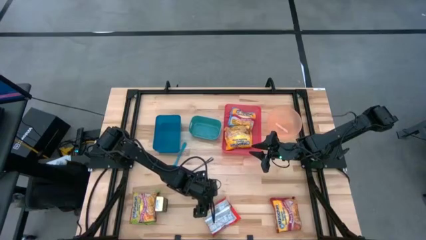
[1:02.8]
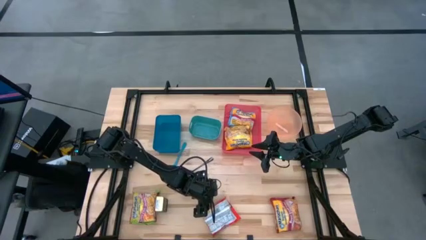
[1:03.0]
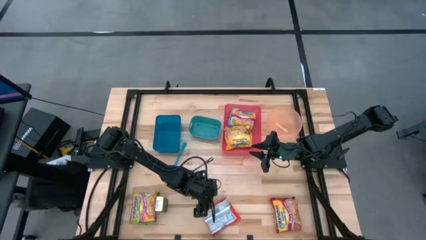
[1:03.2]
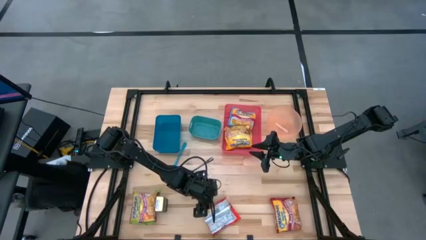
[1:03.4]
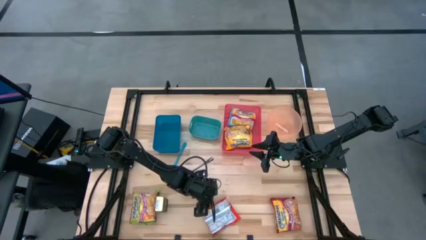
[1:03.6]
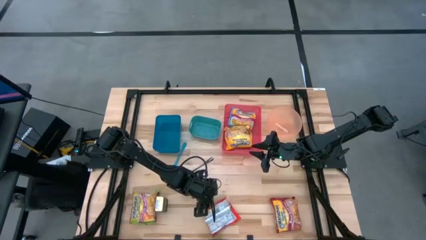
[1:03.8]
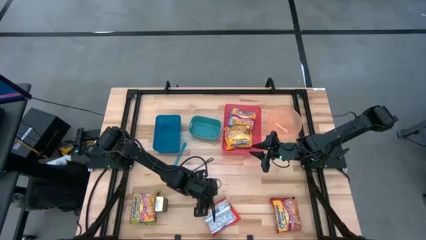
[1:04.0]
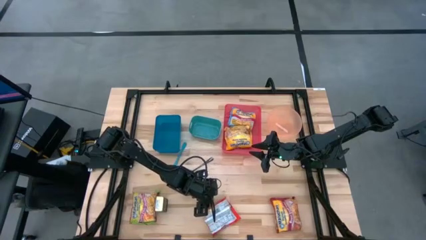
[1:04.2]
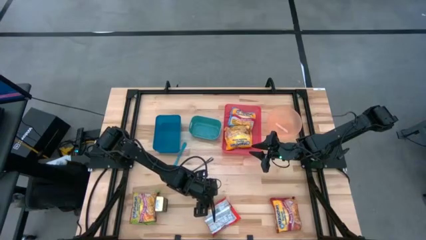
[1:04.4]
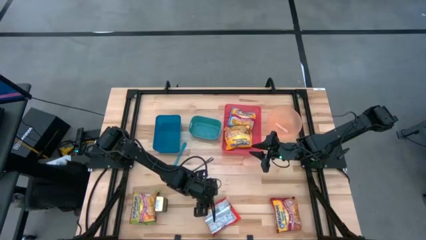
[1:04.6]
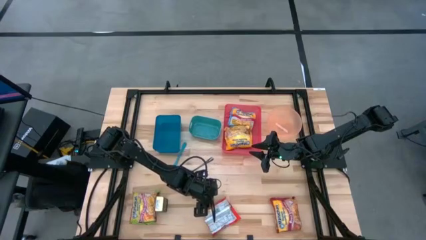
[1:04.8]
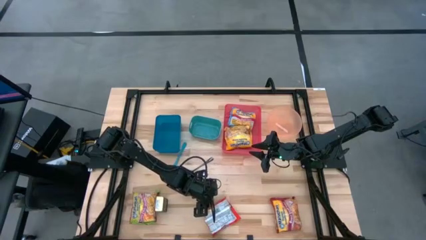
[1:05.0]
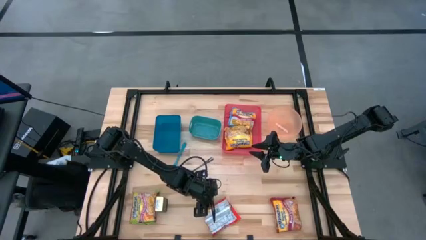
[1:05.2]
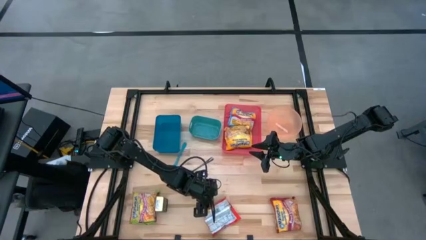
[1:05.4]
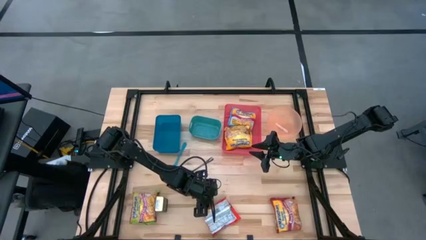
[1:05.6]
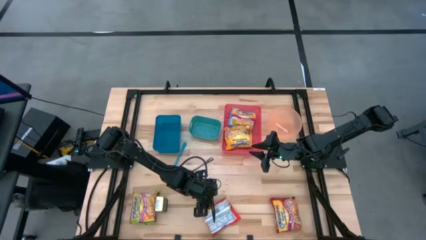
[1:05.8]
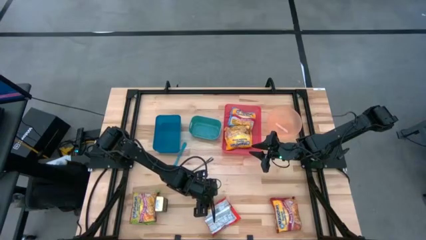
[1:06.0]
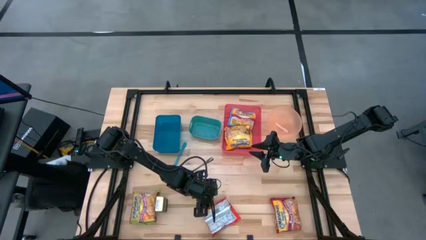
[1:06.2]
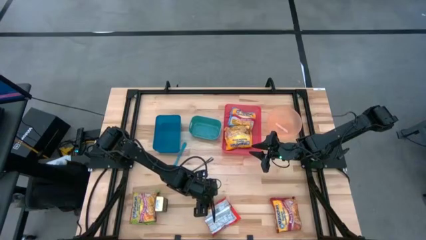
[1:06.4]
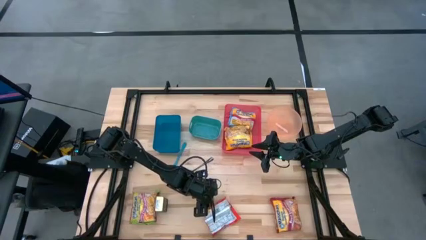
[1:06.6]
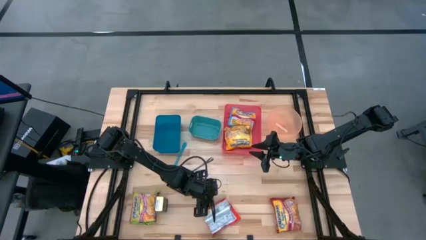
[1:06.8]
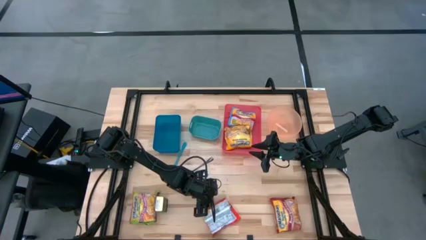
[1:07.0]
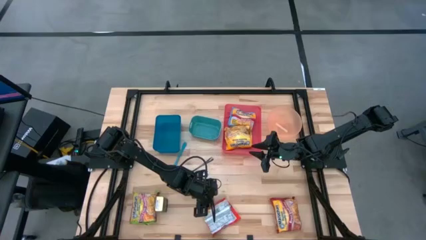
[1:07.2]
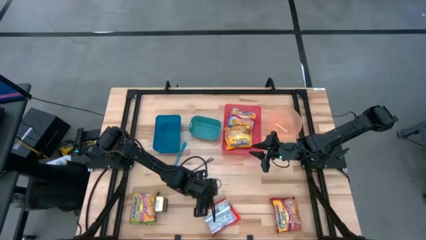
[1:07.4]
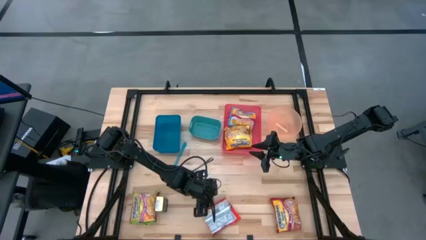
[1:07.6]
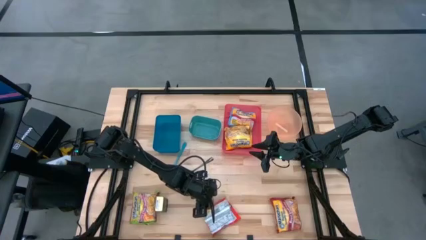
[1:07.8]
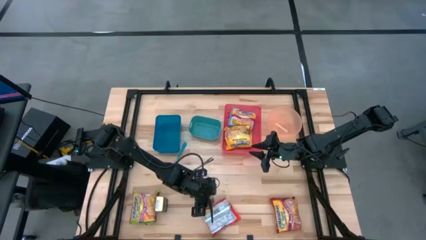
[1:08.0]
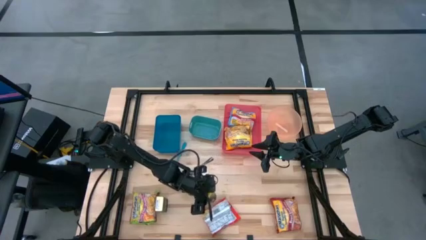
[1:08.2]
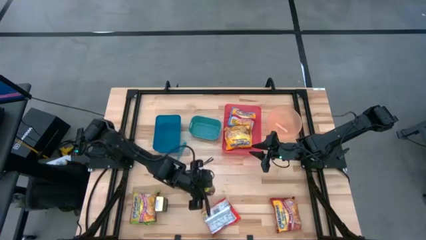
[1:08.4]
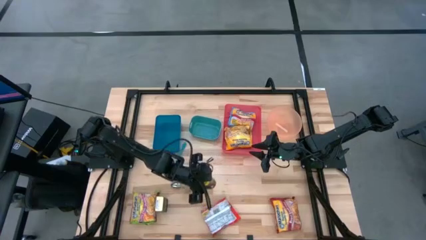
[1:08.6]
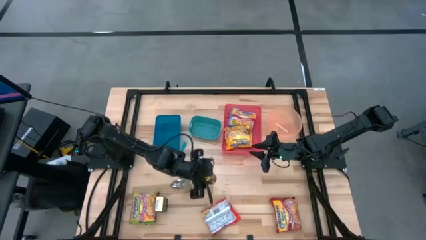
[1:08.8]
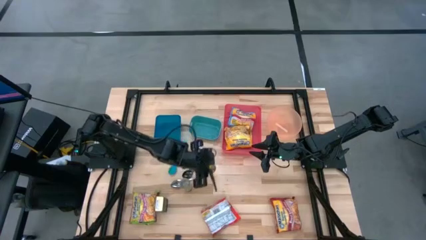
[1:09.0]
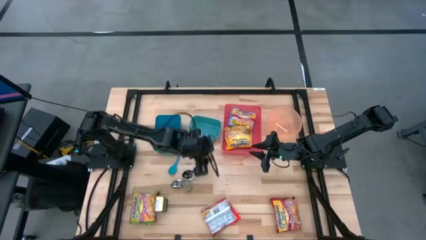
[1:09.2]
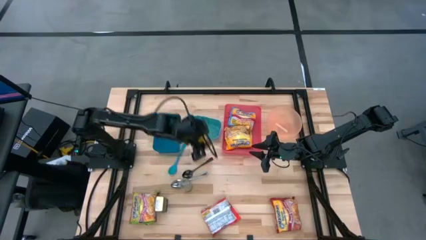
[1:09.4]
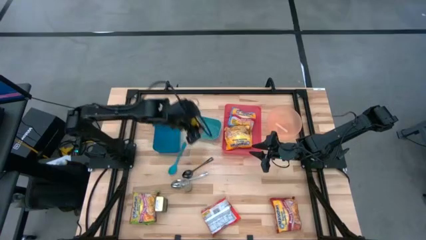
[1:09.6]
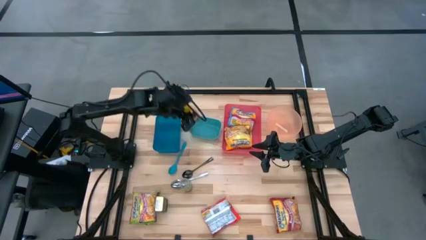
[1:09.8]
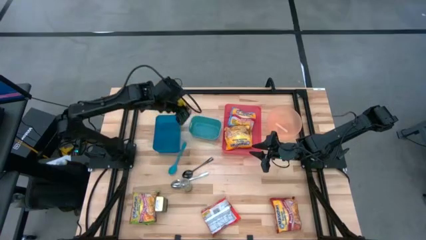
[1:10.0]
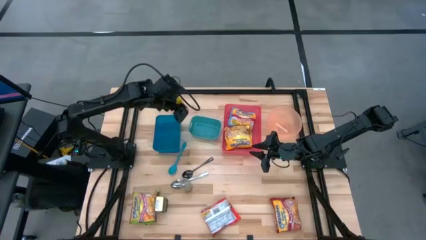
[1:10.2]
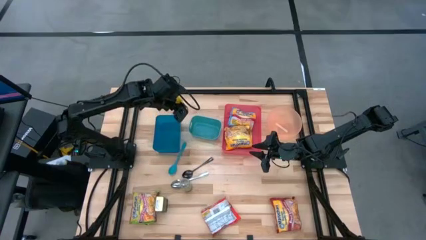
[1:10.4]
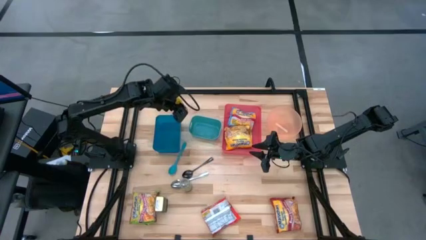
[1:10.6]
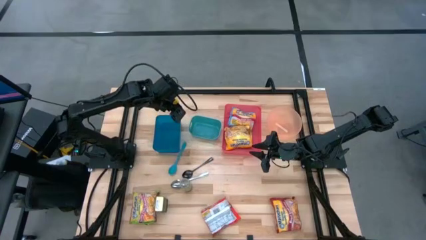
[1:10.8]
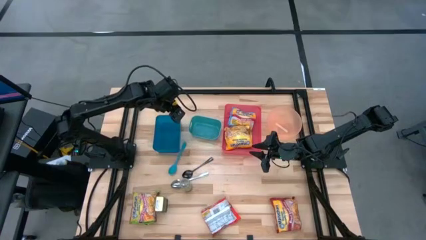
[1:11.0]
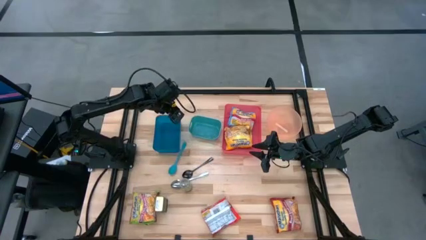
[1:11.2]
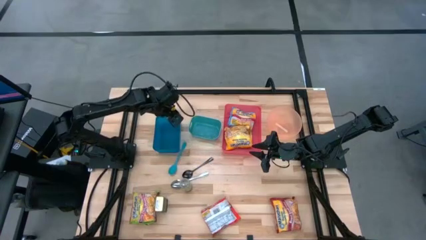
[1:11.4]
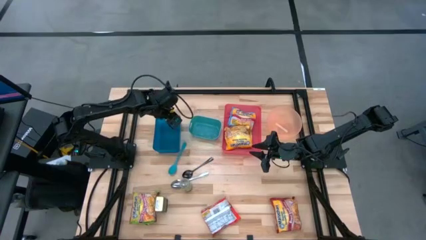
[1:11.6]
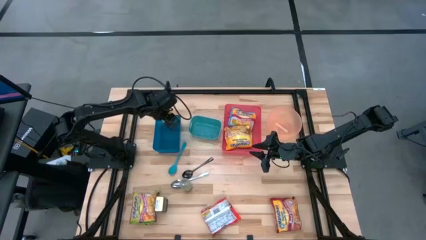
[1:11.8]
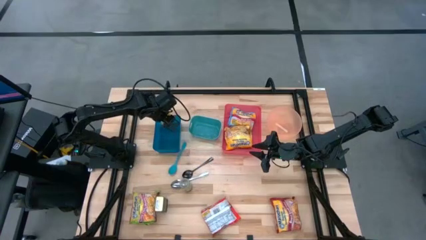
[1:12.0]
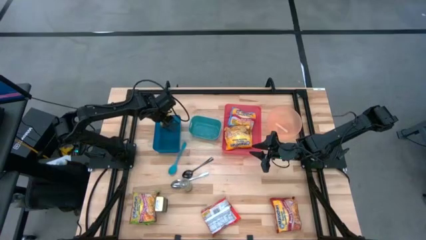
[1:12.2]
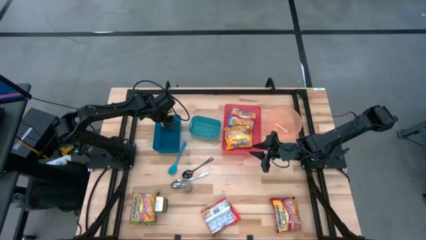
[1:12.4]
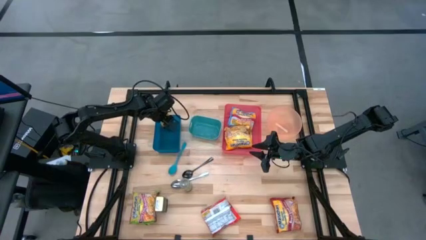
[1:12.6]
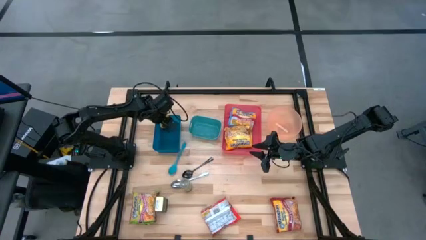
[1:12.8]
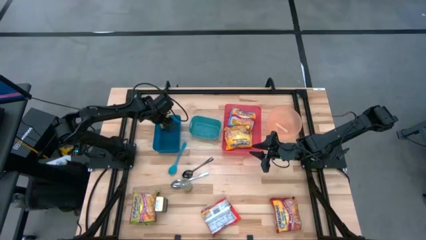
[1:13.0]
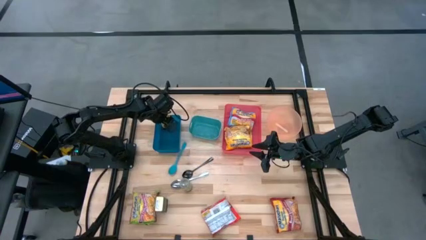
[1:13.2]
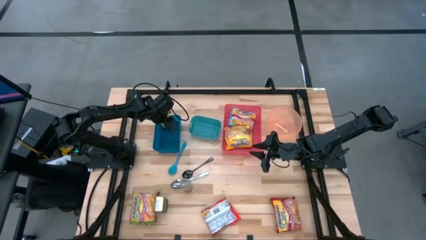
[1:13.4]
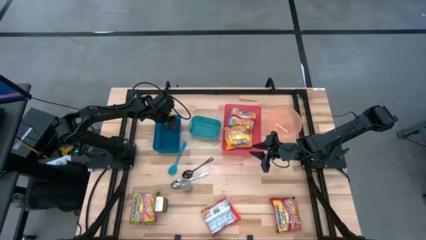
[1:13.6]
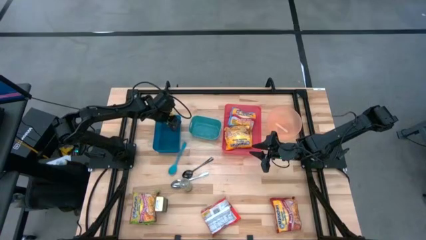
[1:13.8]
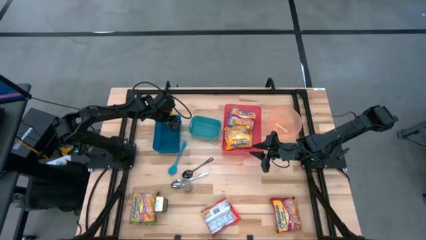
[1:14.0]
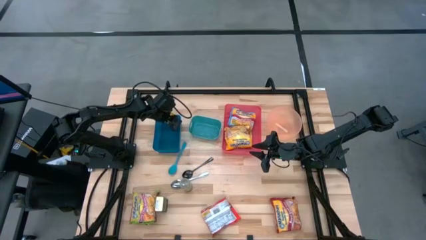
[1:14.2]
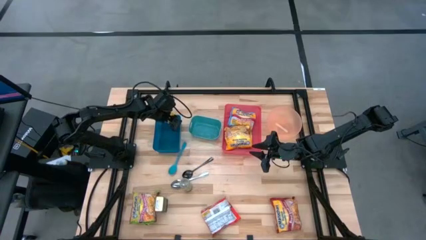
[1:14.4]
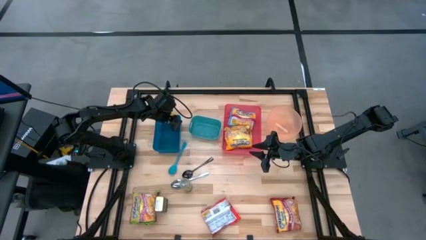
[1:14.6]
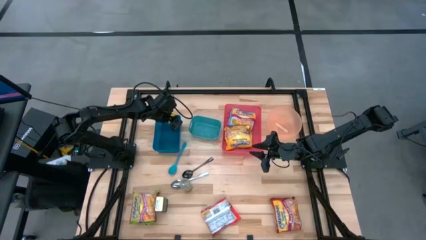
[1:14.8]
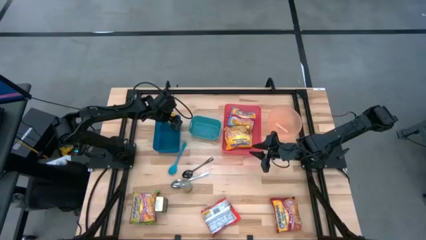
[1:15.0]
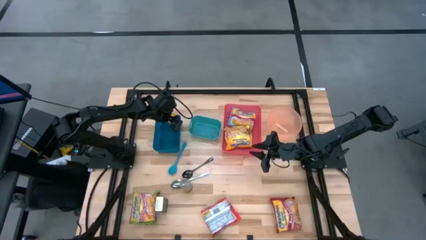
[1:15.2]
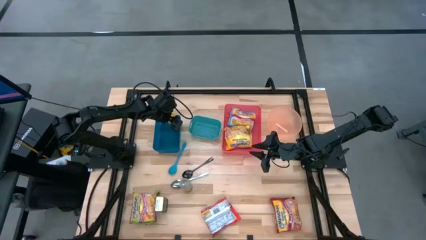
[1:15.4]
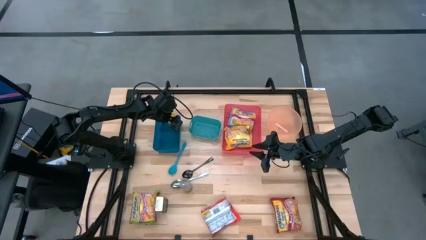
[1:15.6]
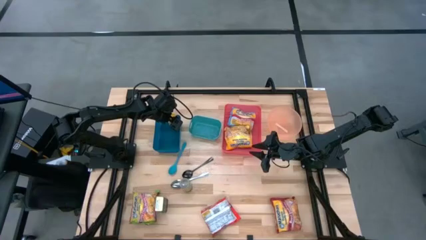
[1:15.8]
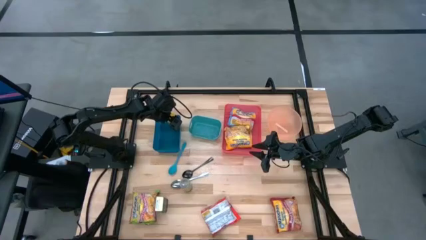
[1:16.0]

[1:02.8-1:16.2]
Task: Pick & Place Food Item
Put the yellow seasoning bottle into the blue bin

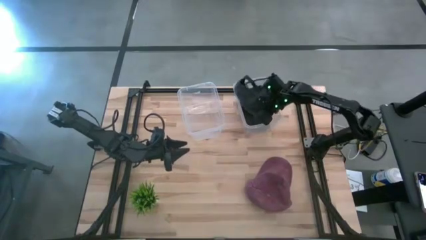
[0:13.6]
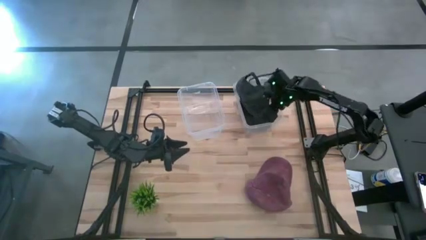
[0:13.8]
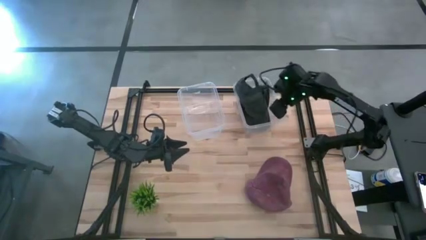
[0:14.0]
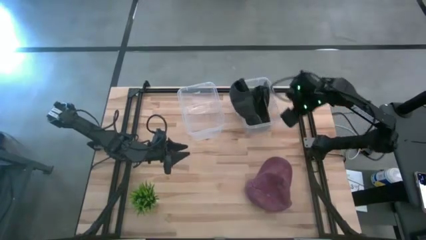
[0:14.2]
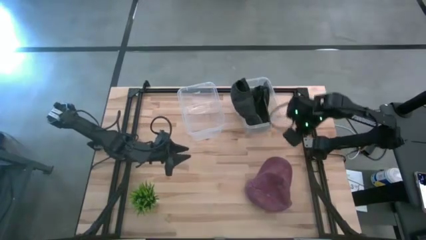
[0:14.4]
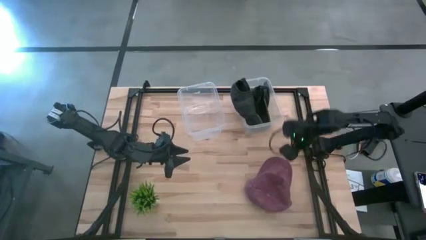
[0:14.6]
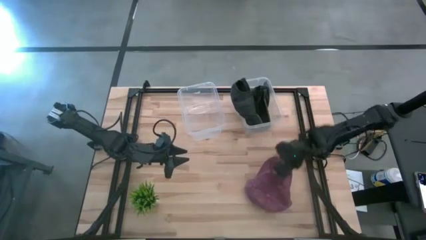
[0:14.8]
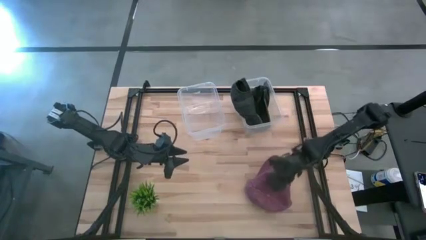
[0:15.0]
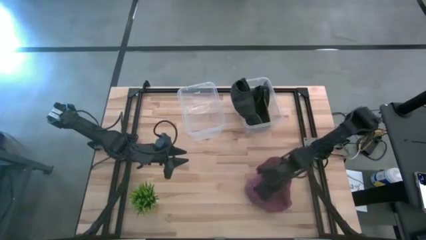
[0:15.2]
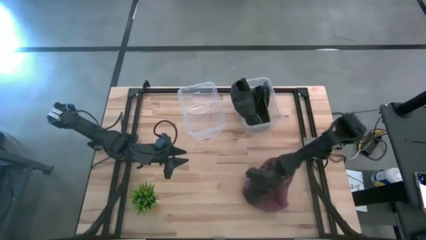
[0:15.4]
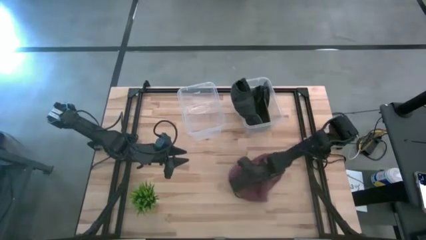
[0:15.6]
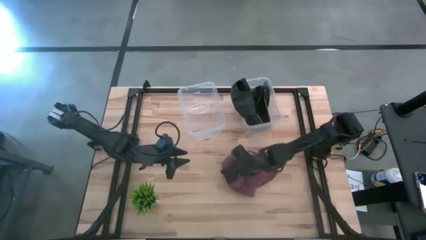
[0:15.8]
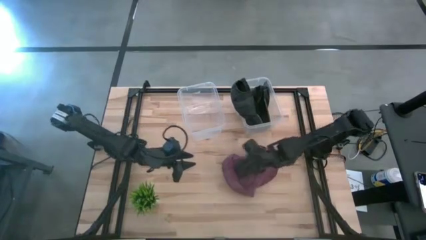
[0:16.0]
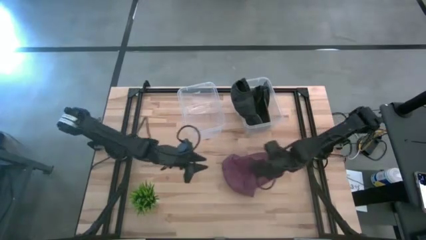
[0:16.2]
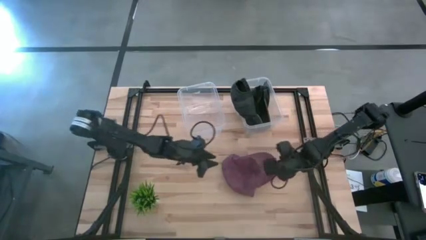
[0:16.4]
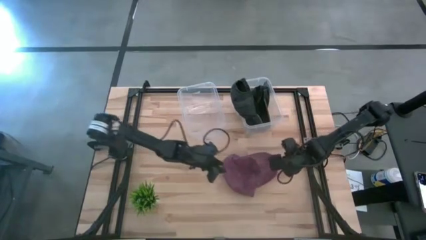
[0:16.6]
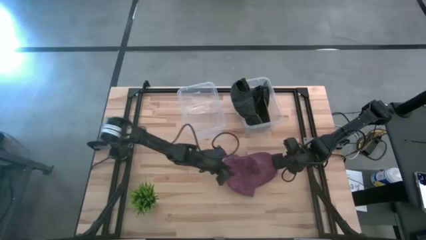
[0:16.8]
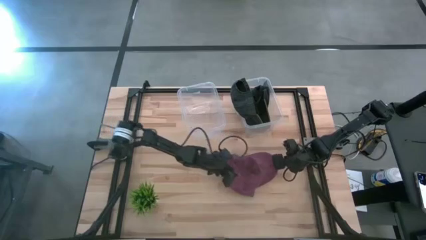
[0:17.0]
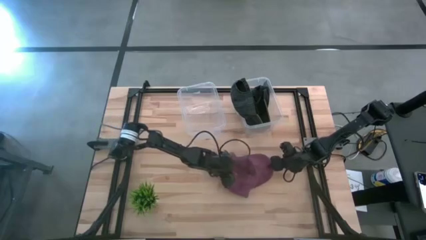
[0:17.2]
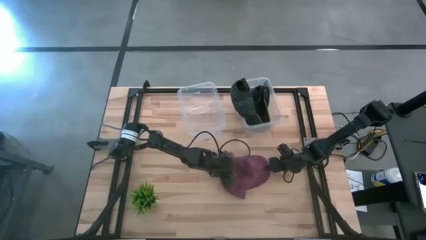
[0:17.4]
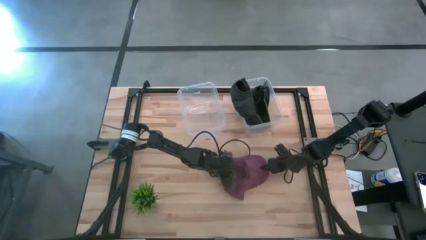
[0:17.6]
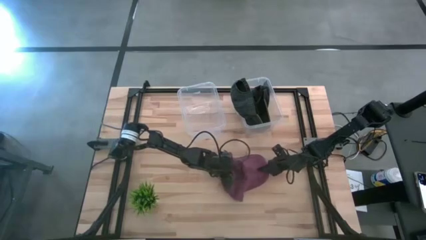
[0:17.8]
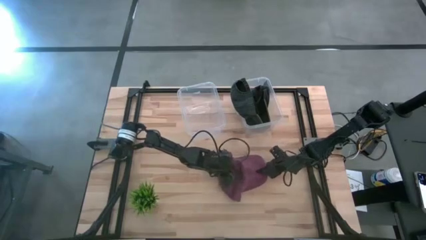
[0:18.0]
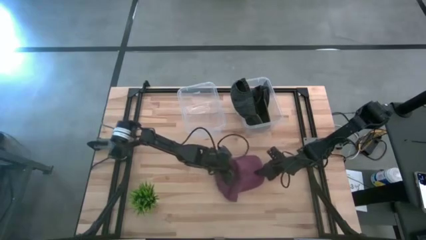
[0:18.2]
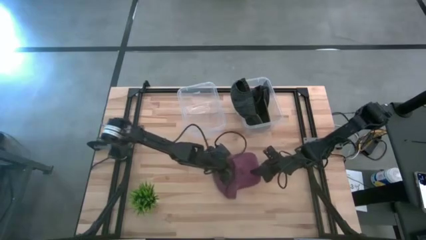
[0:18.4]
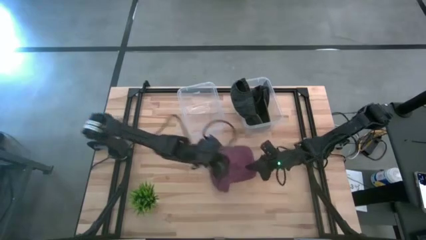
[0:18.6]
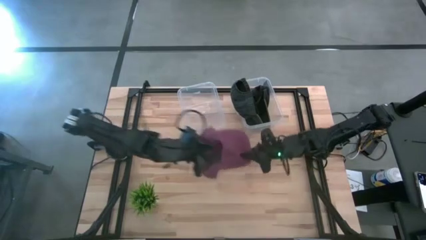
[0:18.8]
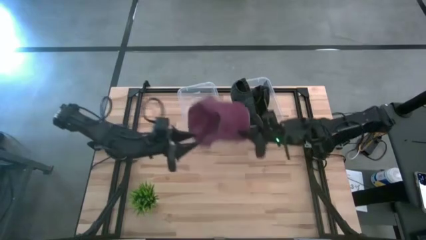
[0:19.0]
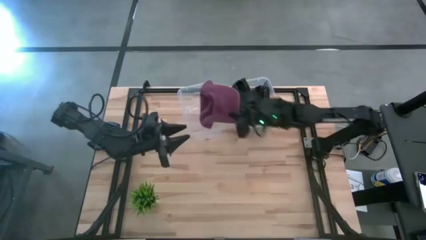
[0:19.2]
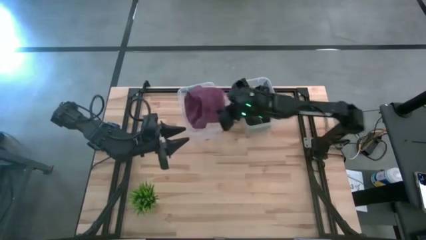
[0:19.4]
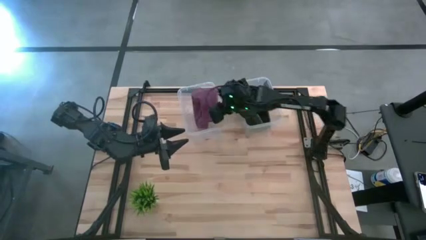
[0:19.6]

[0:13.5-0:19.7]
Task: Pick & Place hat
Put the red cap into the left transparent bin
